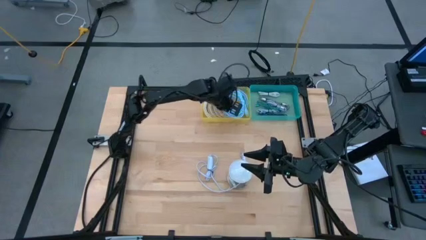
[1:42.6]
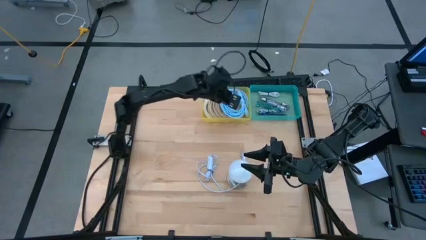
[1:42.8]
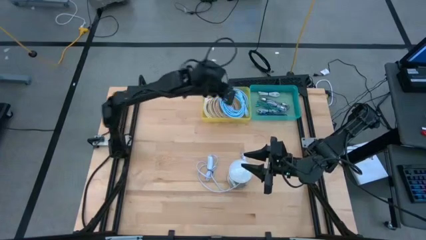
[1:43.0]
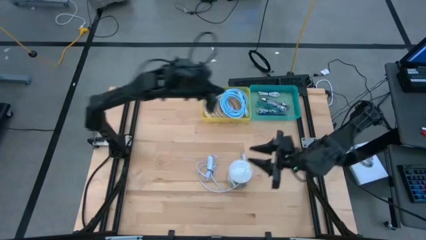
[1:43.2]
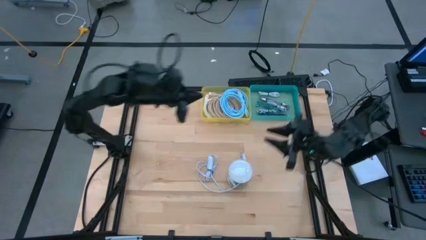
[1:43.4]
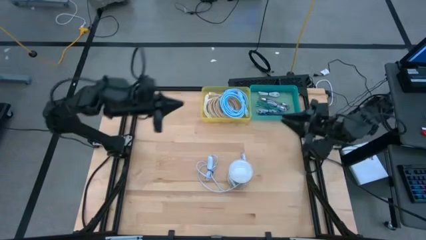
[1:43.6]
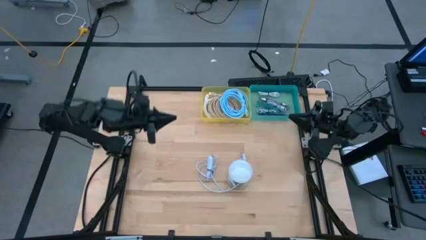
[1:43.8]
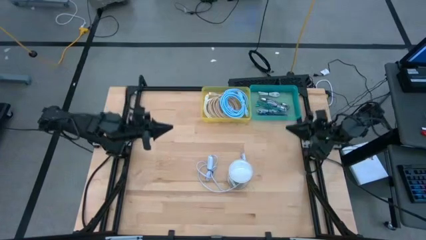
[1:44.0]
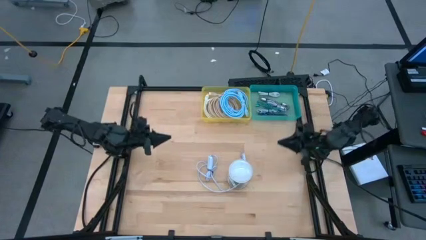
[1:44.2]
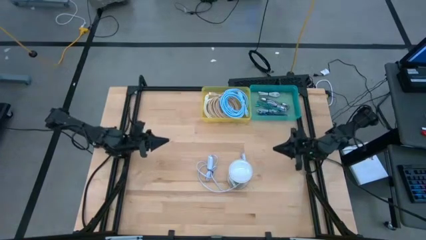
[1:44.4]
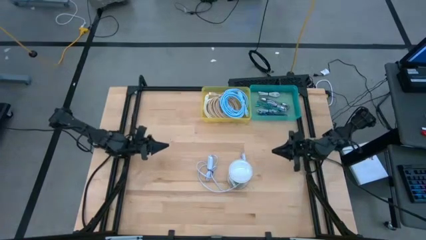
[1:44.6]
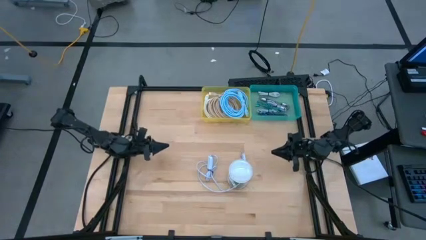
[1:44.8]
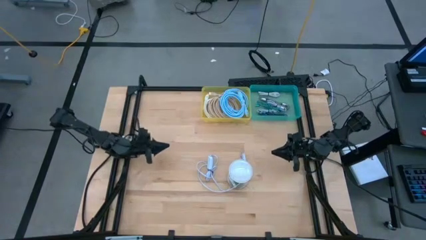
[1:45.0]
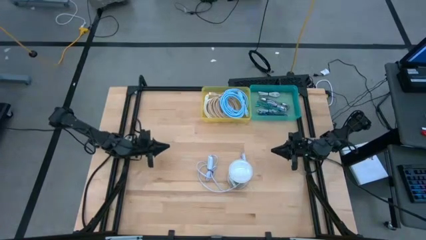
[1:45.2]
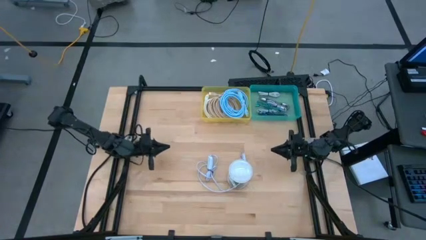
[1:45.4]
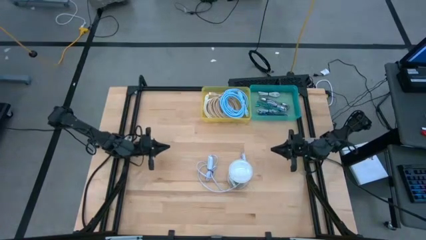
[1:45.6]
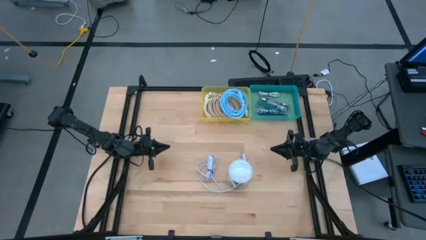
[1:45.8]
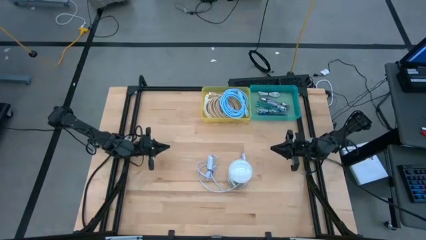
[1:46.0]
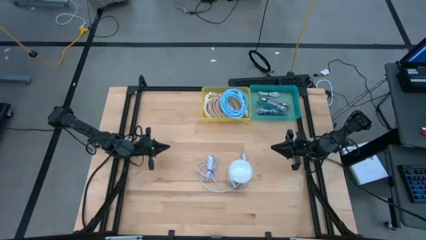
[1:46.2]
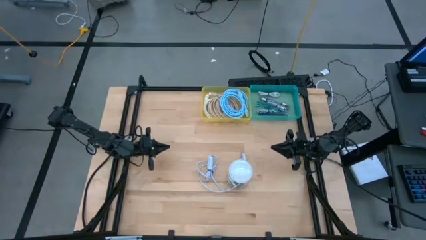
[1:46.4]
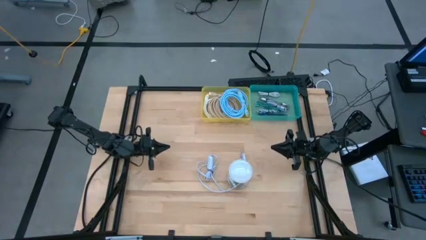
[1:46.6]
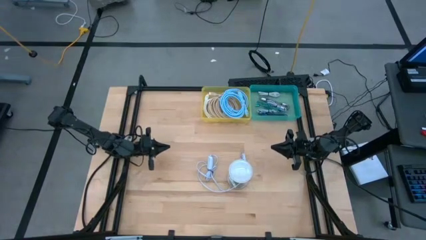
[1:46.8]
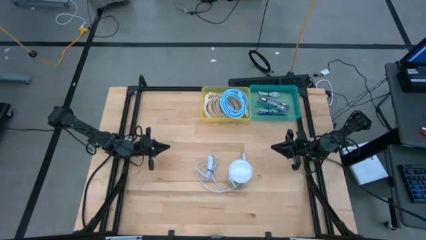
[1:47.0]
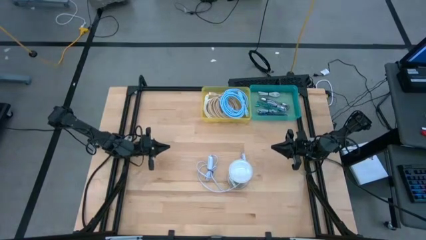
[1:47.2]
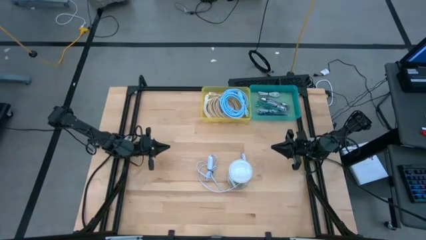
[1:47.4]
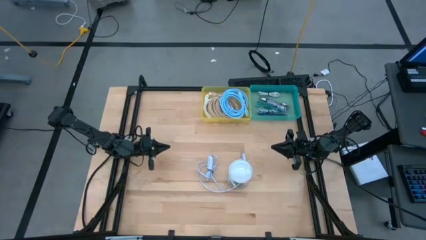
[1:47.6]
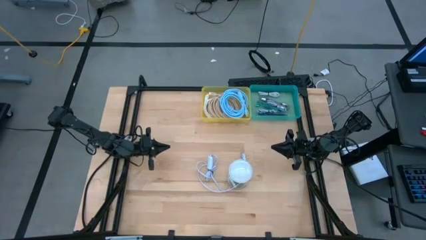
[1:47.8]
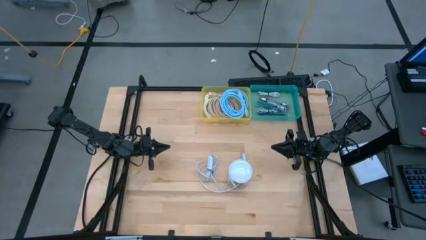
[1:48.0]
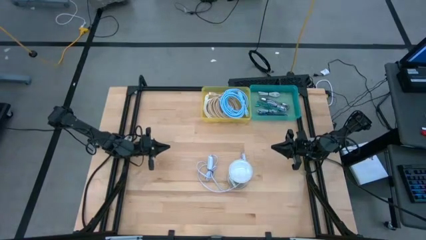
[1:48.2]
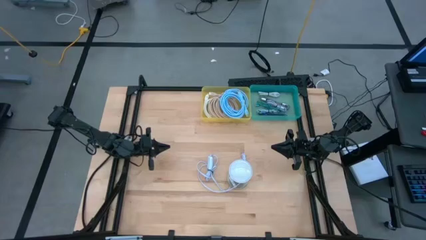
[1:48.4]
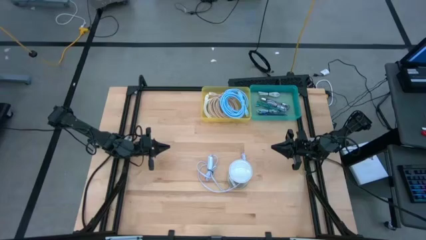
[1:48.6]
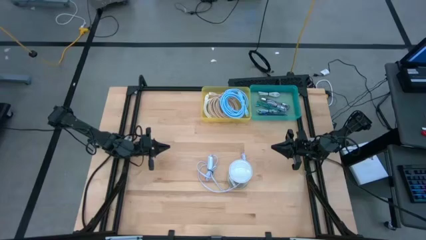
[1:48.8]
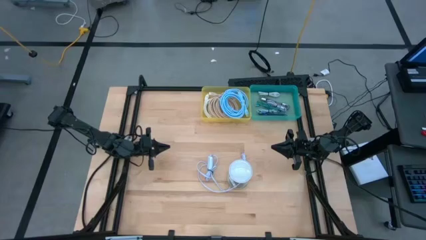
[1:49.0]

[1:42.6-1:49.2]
Task: Pick & Place USB Port
Return to Home Position

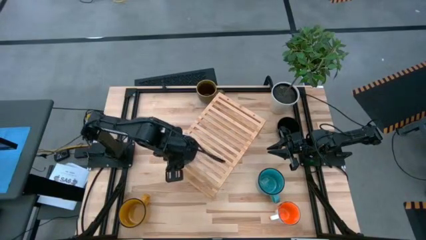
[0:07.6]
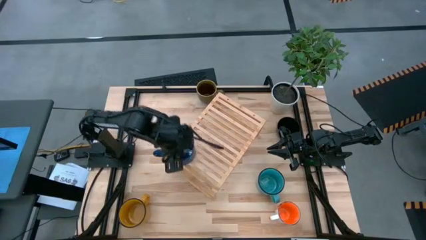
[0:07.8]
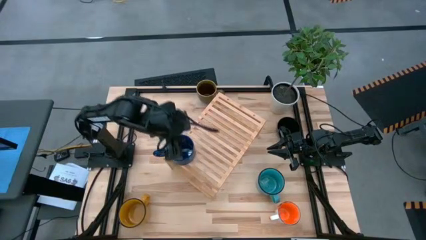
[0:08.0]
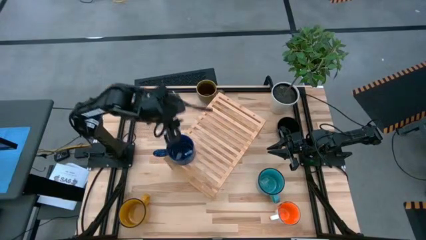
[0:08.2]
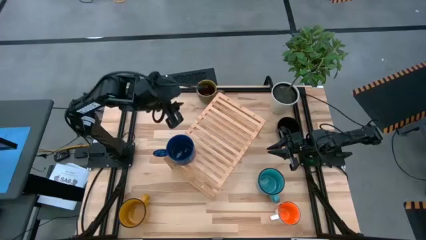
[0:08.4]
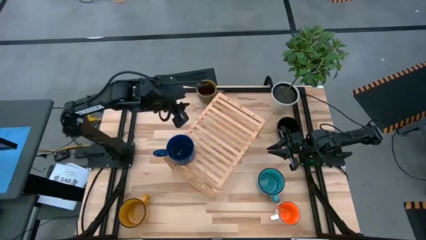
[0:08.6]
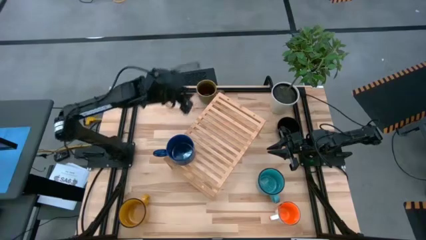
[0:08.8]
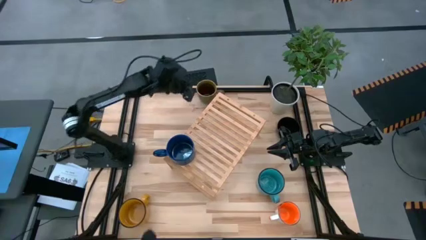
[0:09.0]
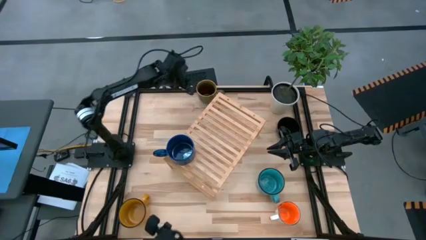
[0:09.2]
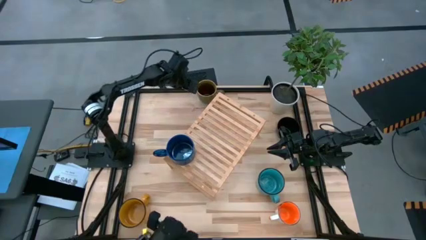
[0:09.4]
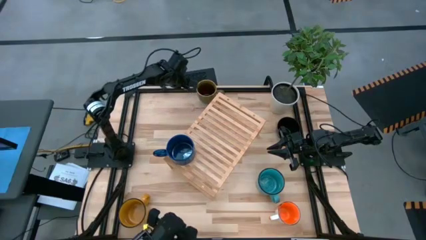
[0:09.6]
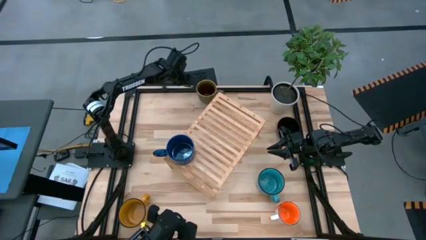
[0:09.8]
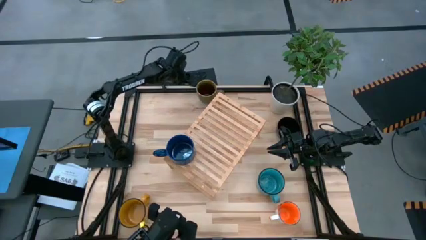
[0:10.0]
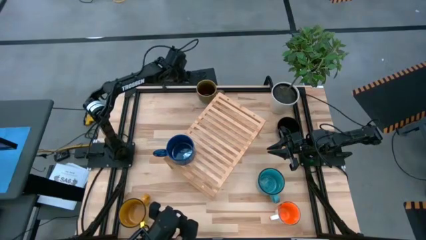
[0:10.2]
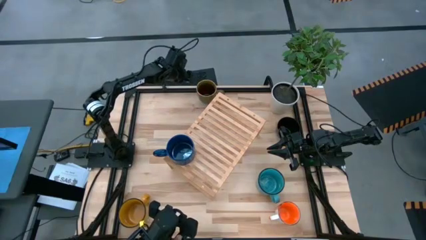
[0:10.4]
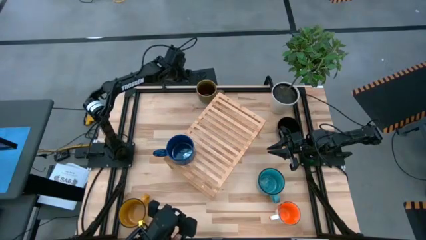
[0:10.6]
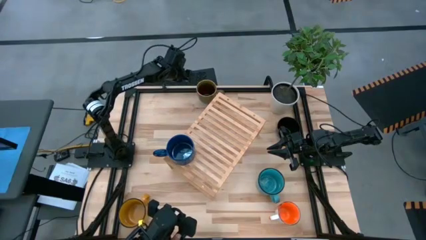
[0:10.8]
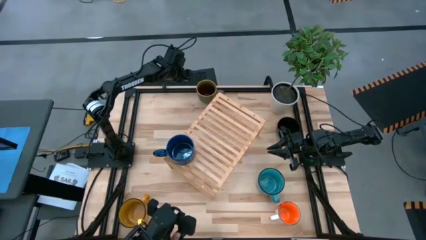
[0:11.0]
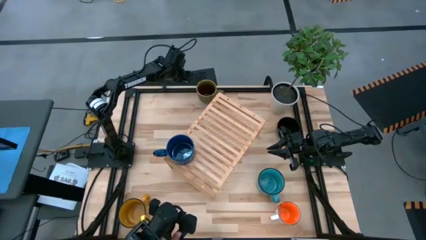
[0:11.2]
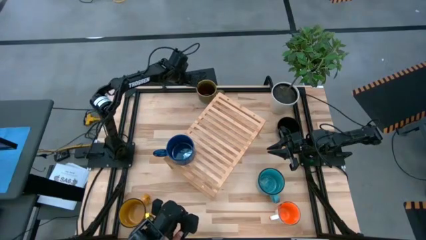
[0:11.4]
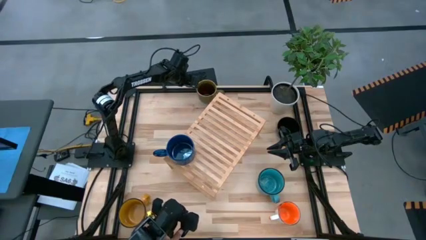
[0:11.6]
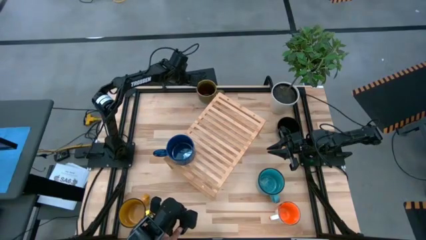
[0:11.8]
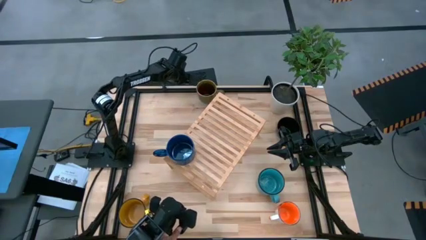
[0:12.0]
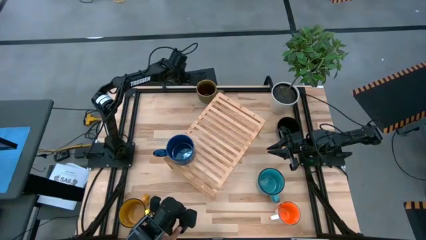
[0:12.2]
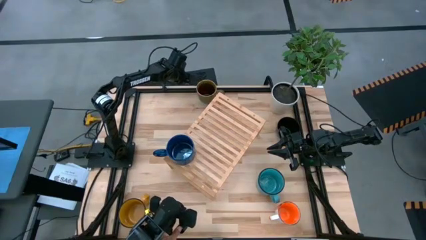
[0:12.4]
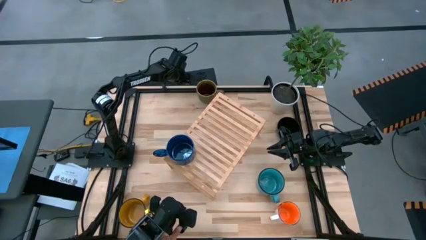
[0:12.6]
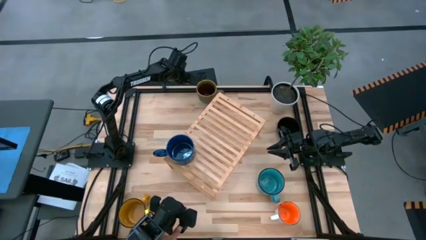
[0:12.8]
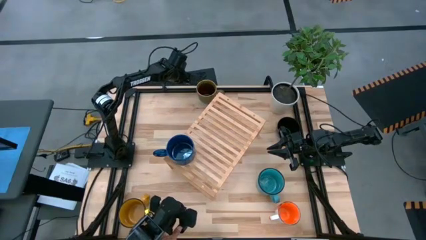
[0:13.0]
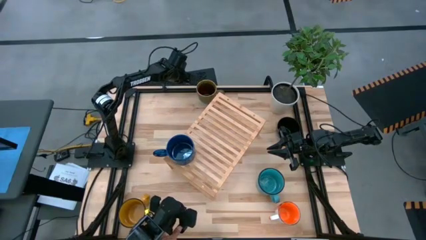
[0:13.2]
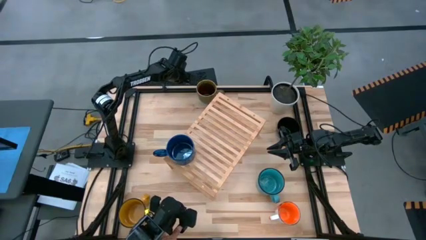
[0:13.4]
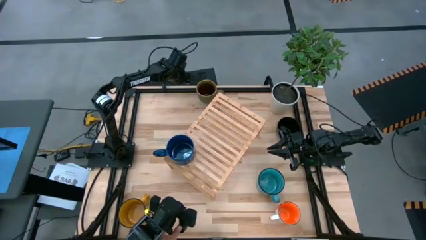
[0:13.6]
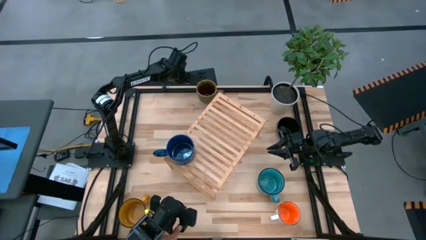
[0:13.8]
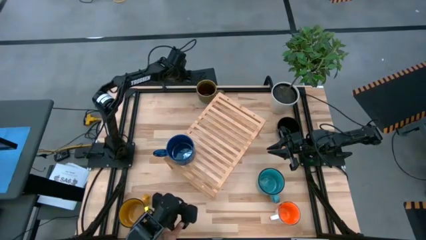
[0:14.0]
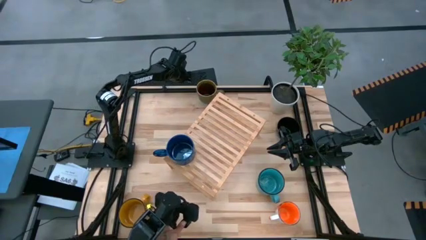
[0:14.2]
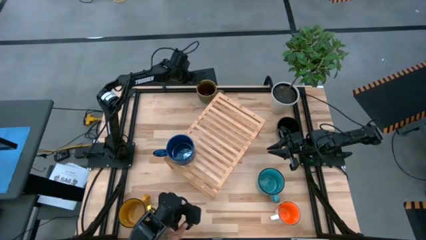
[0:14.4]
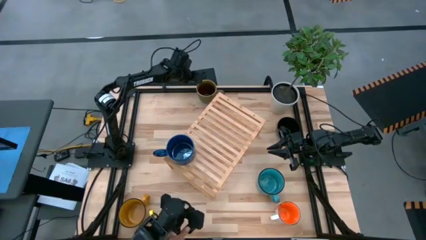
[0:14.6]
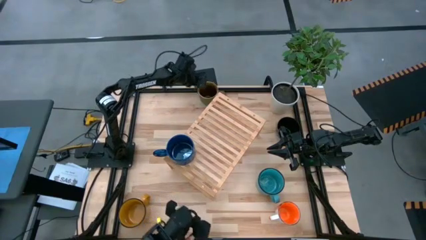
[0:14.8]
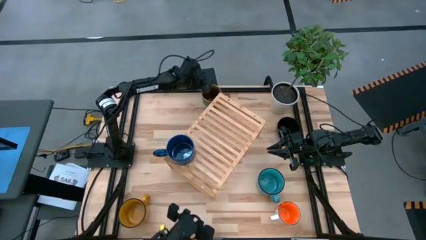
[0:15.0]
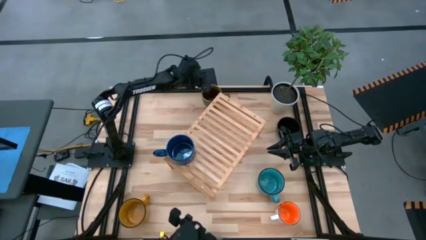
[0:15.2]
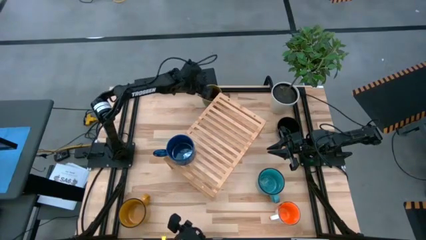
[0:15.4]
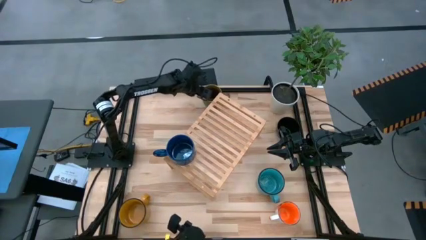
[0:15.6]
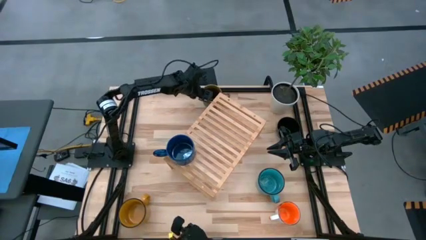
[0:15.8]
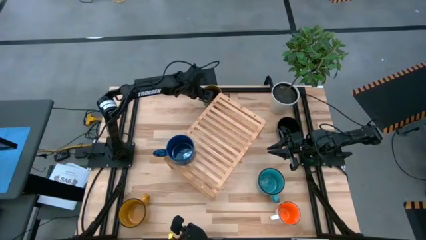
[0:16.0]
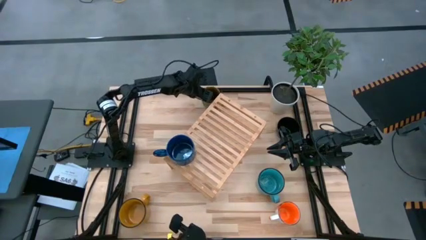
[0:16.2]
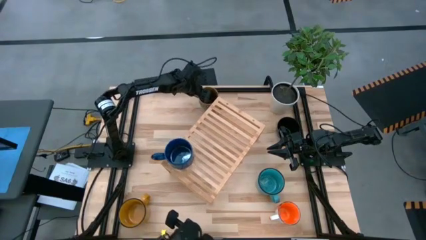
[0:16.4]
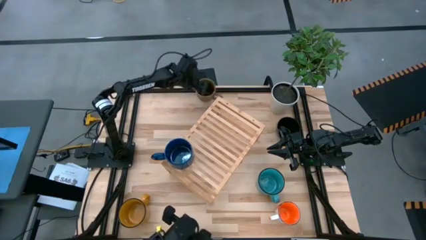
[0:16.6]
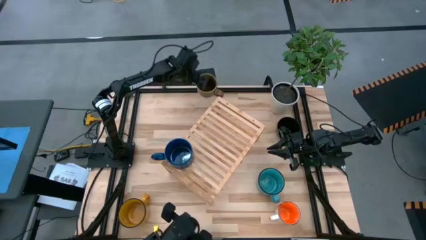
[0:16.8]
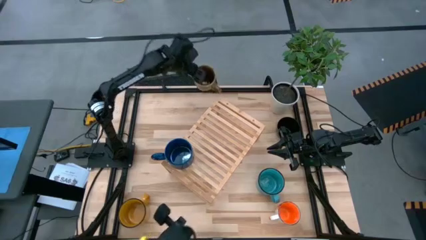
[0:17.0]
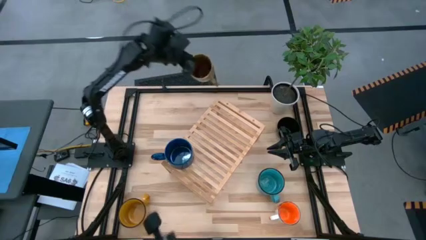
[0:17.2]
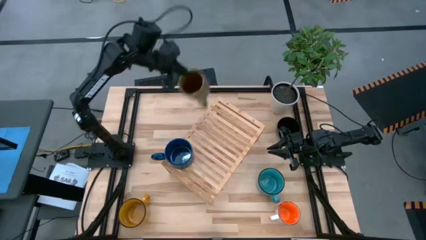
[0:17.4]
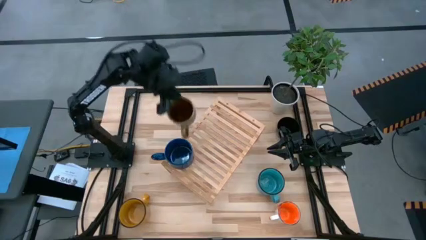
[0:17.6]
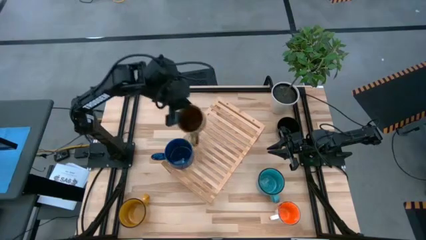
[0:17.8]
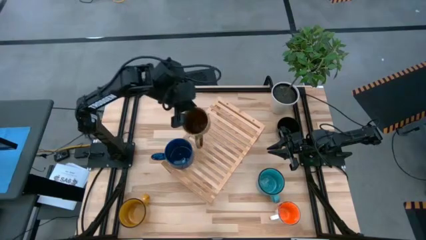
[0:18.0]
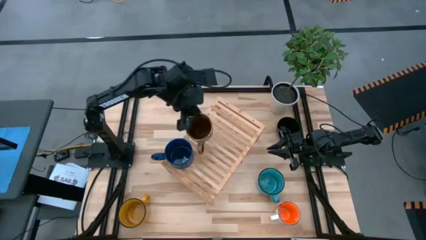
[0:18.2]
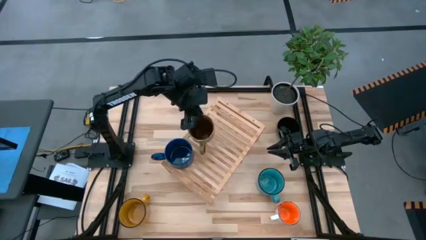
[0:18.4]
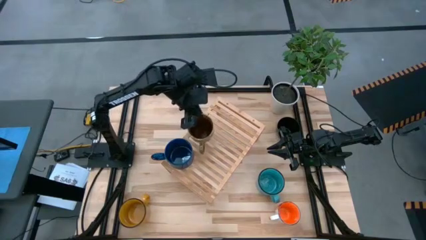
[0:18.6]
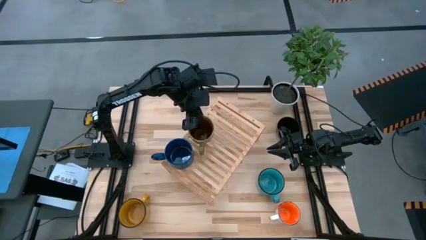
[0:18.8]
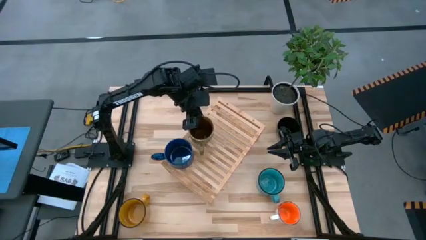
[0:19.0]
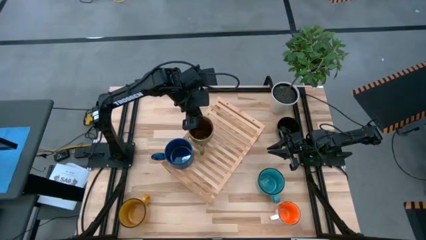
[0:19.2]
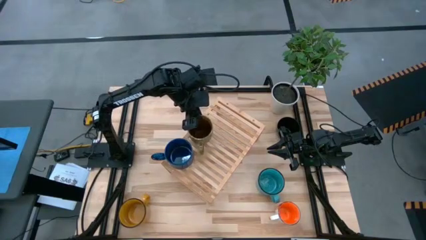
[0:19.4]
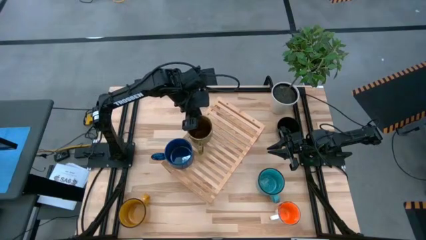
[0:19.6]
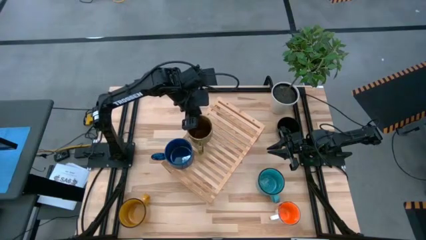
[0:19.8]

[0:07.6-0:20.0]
Task: Place coffee mugs
Put the green mug on the shelf
